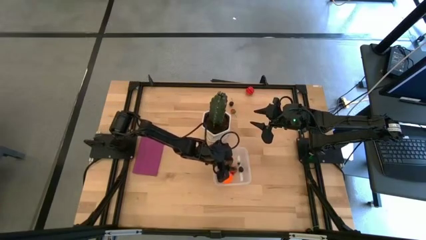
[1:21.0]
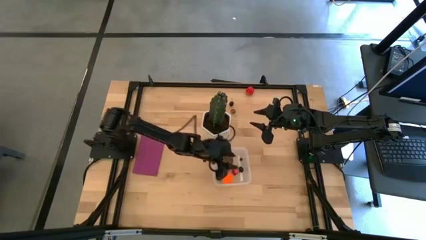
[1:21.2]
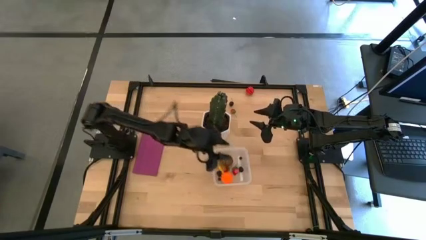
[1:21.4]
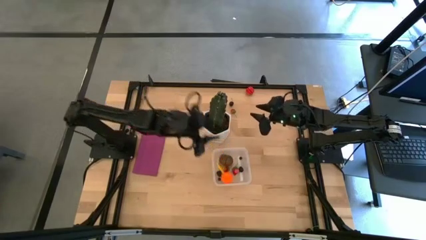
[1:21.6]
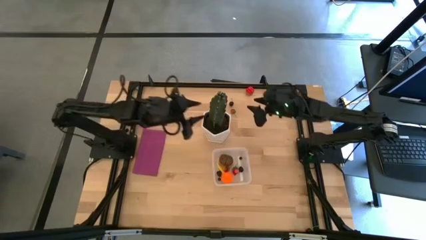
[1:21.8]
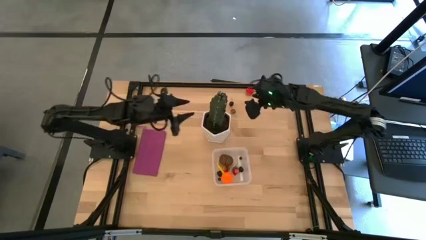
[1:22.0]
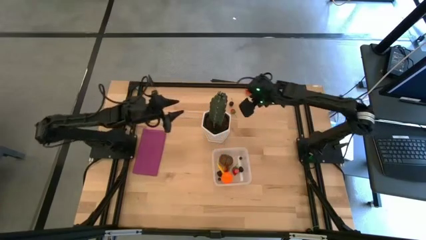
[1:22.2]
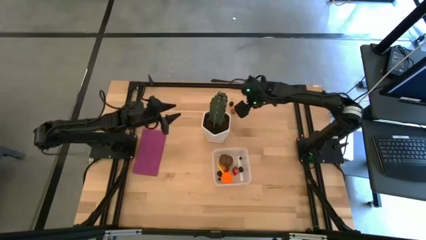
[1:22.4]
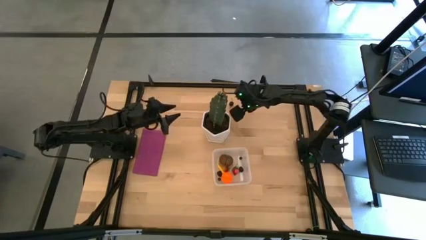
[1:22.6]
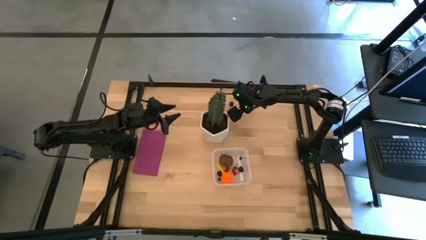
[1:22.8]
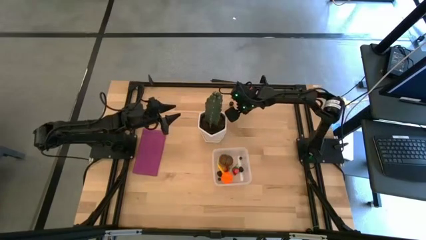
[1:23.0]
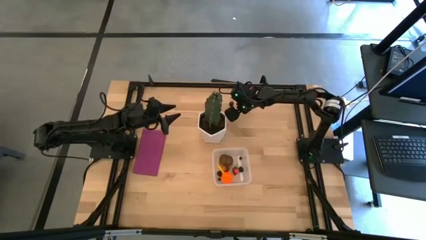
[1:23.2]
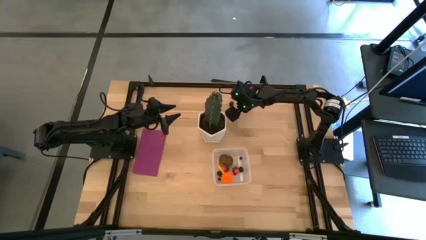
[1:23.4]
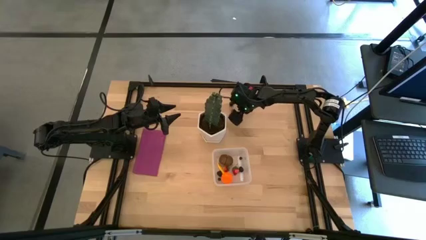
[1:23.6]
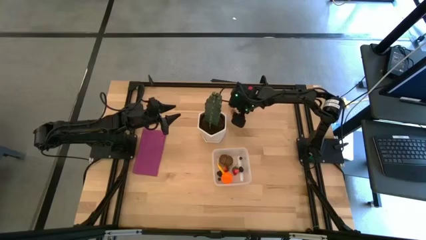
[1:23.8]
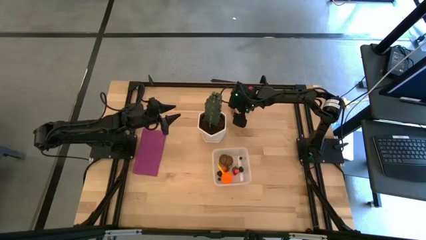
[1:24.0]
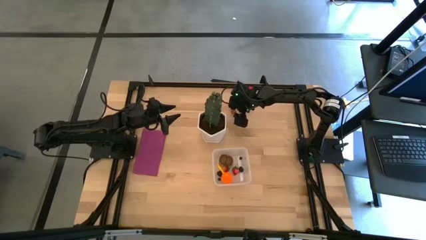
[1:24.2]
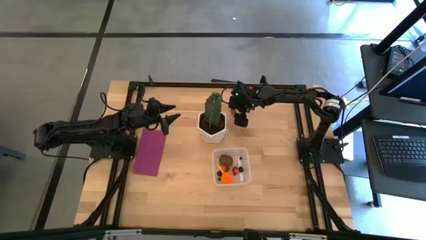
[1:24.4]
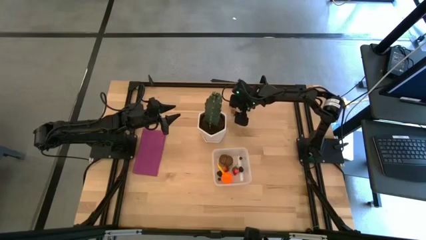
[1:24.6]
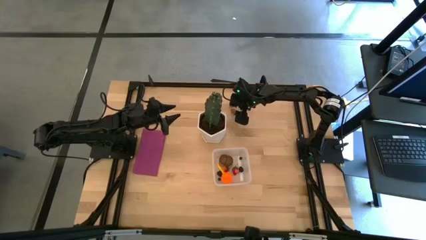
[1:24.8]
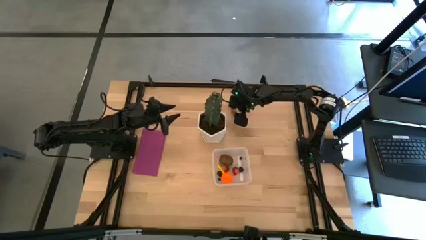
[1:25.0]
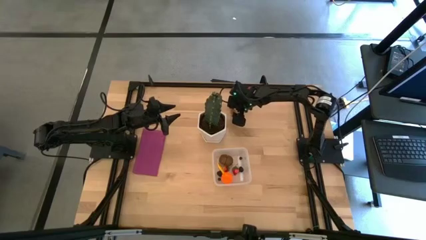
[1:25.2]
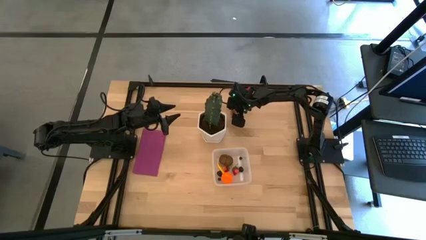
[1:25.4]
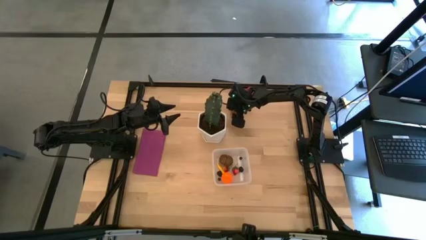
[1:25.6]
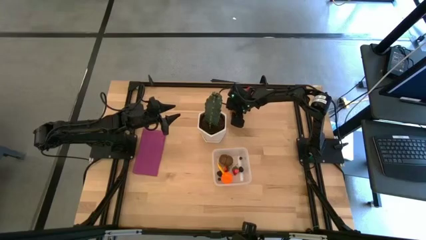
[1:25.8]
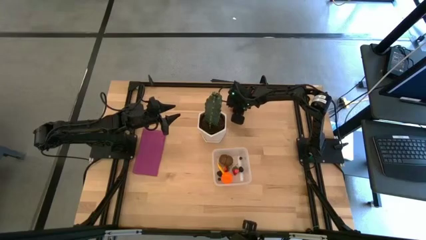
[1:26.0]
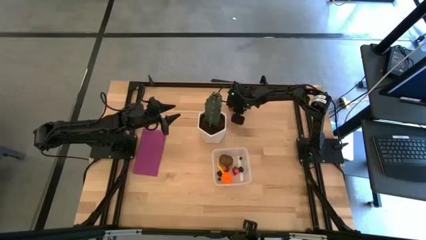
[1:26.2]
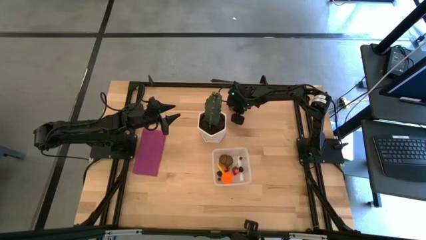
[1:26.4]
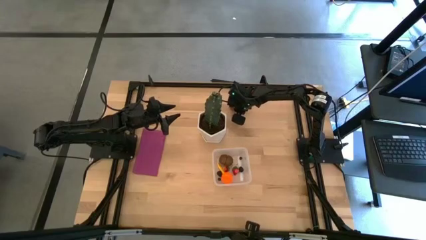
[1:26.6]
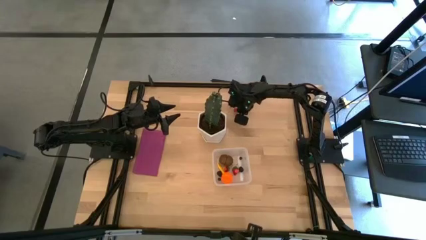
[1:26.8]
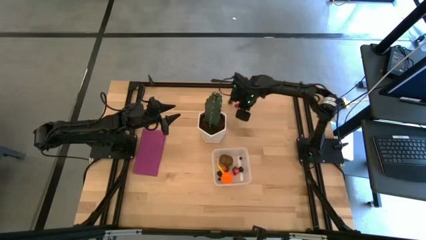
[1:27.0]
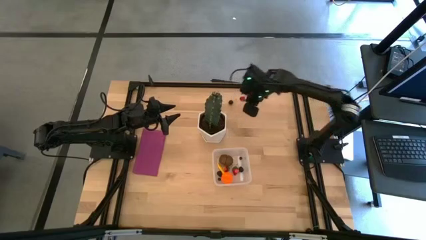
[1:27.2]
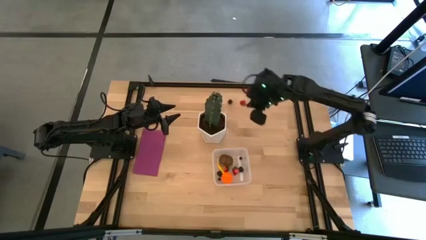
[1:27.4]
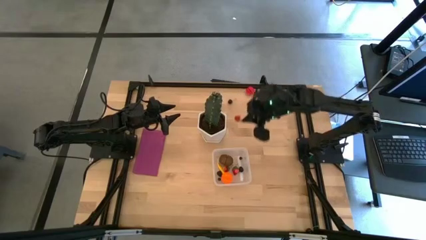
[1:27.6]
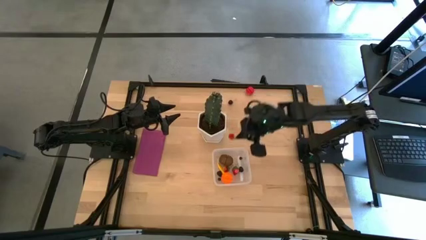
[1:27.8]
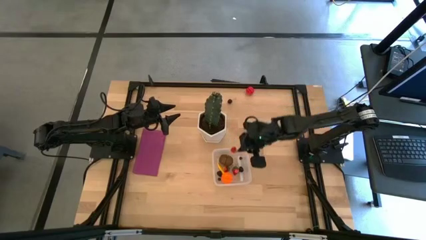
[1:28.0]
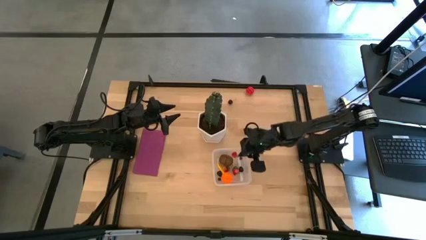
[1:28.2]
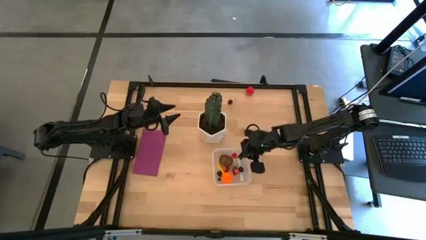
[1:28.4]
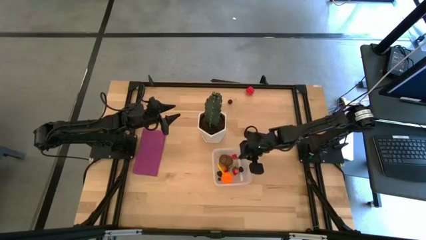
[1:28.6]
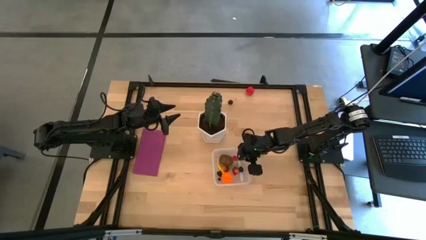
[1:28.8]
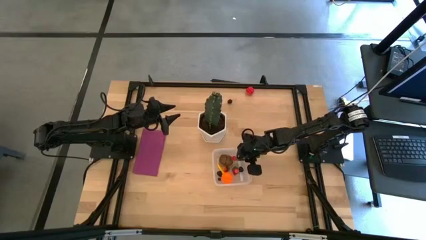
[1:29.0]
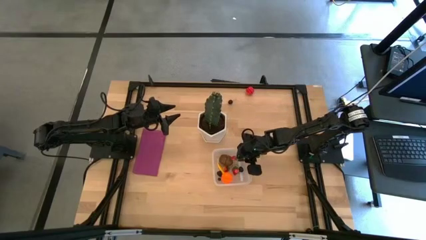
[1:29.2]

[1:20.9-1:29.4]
Task: Pick and placing Produce into tupperware
Put the bottom strawberry into the transparent bin

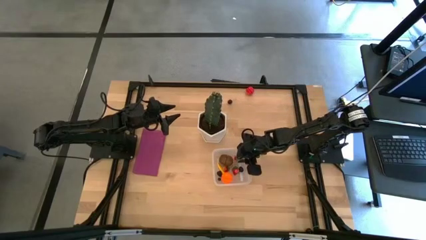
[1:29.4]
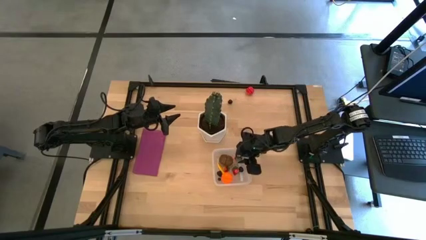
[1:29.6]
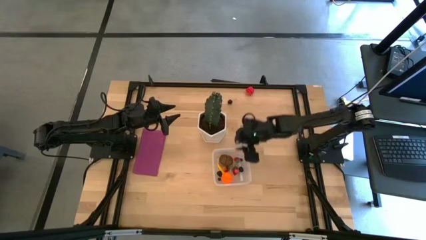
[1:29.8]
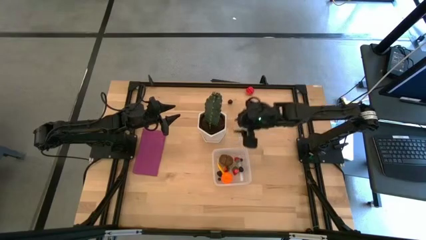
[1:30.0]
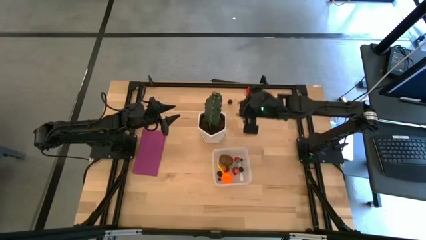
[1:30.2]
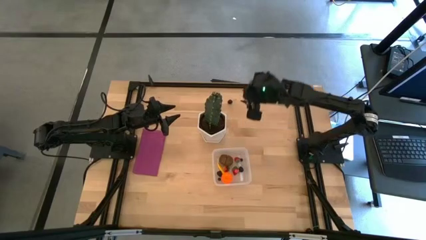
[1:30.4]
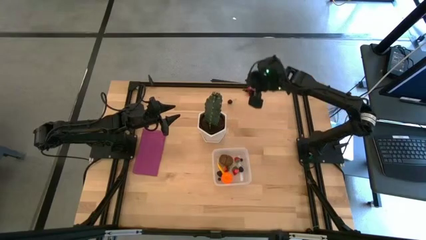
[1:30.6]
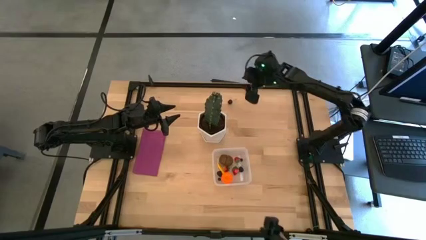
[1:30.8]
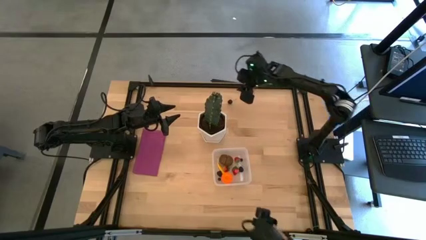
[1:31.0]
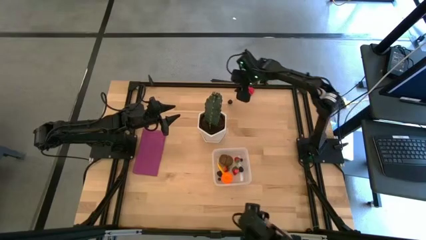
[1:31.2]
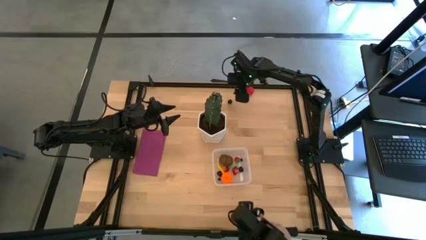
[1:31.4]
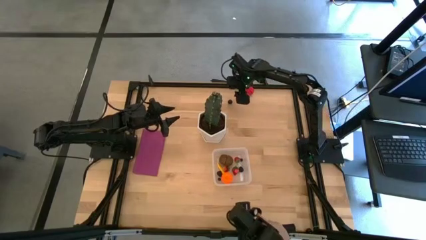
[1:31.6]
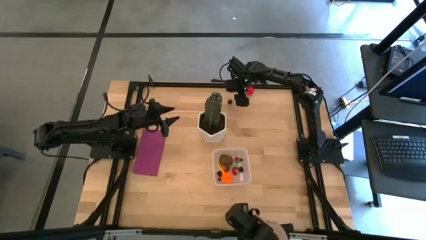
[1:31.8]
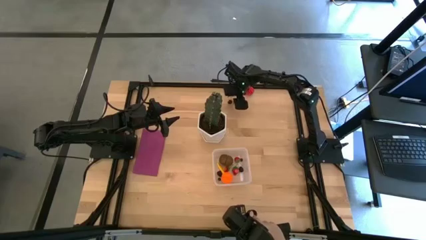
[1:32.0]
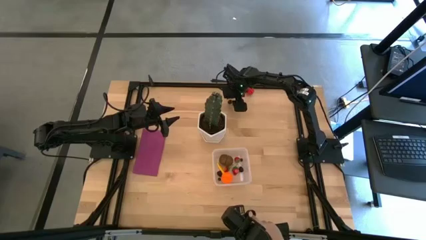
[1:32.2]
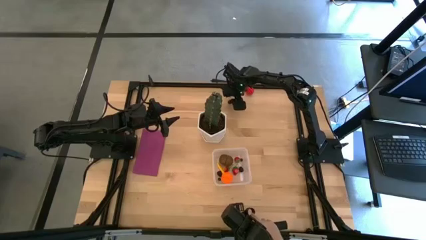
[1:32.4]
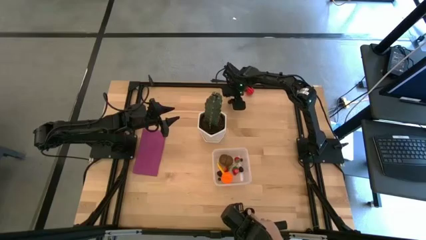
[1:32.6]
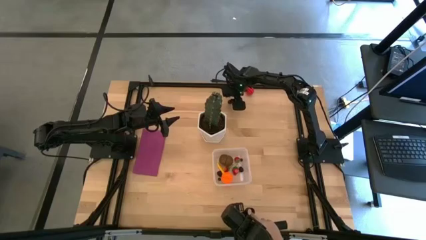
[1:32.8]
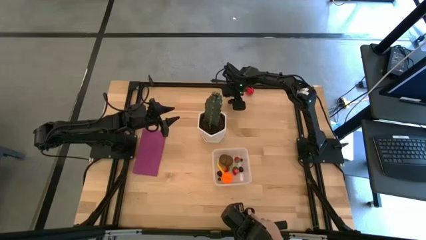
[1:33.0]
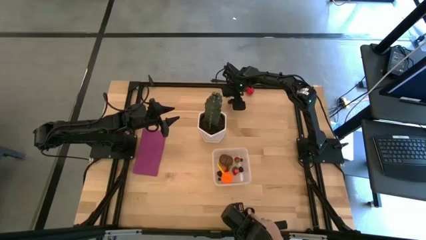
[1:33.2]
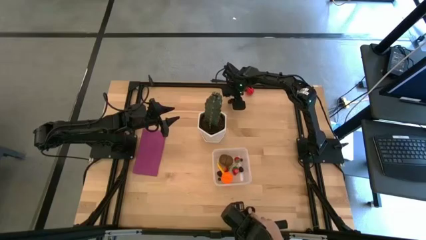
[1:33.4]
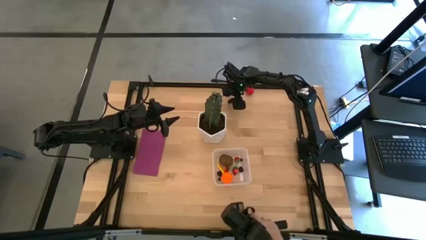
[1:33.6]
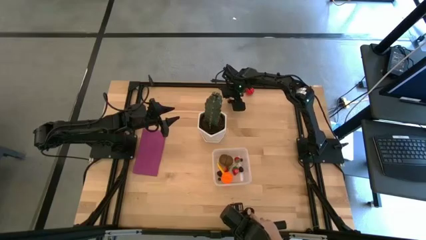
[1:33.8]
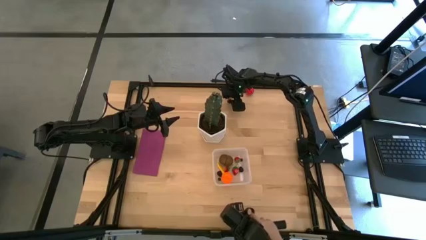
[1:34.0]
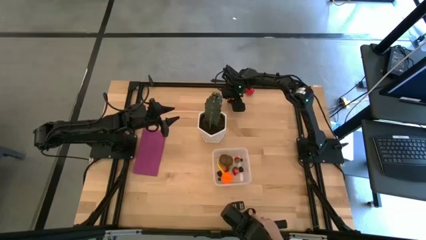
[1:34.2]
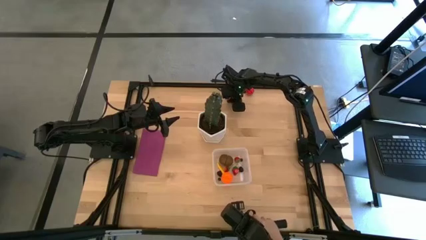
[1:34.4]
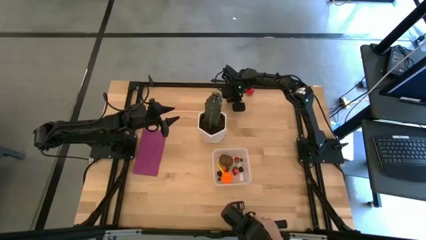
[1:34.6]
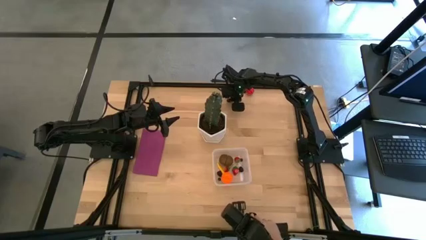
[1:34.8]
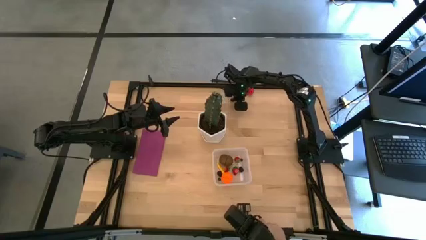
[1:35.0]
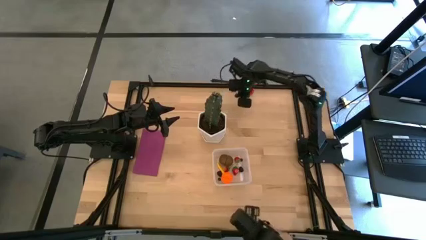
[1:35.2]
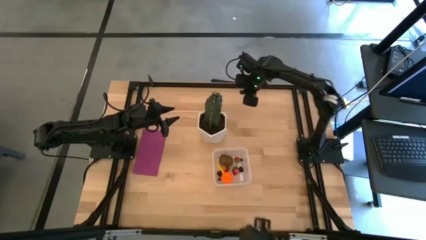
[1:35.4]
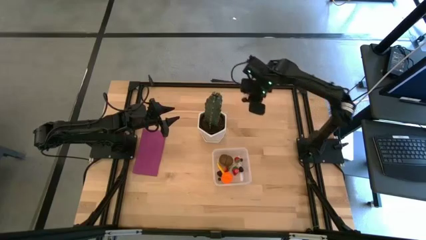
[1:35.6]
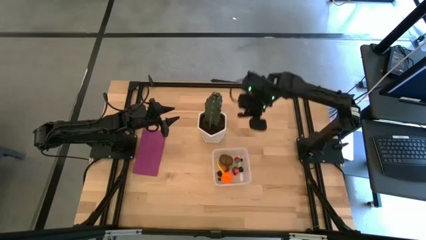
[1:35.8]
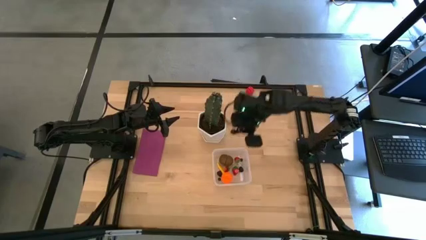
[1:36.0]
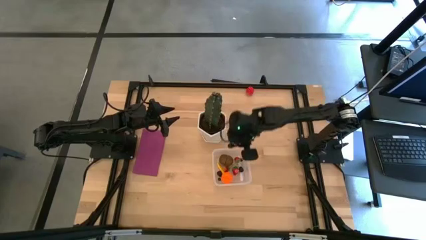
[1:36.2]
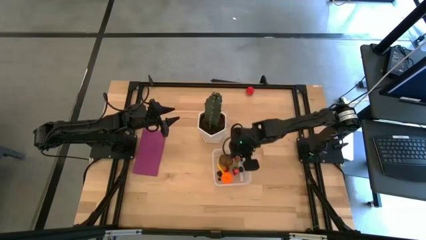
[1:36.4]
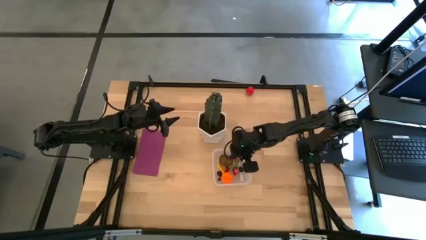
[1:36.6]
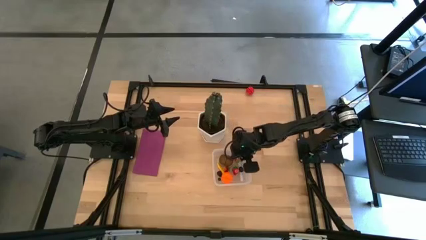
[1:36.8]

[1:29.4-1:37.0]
Put the black cherry into the transparent bin
